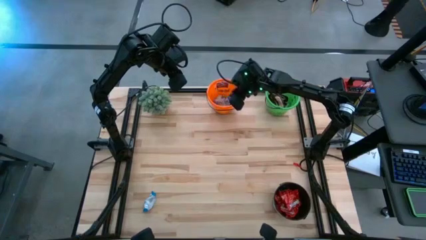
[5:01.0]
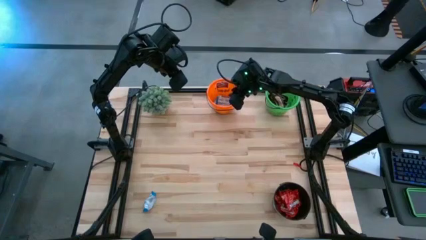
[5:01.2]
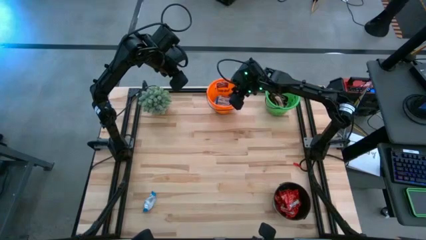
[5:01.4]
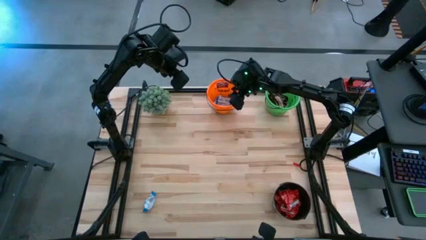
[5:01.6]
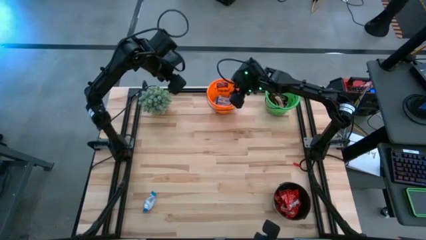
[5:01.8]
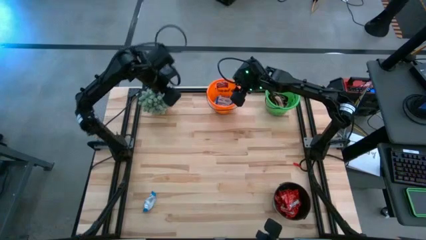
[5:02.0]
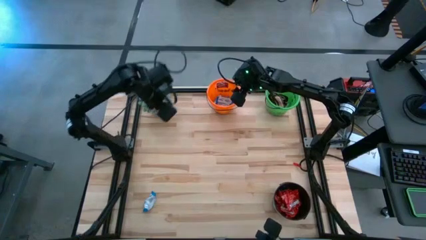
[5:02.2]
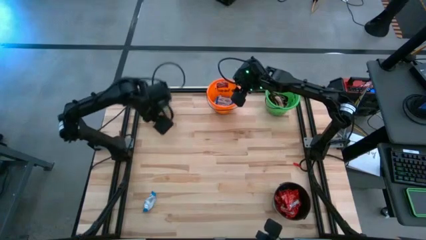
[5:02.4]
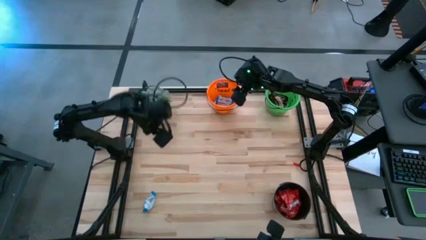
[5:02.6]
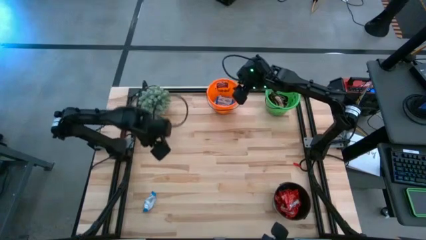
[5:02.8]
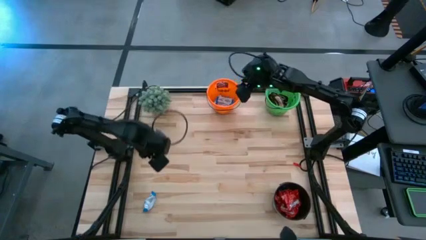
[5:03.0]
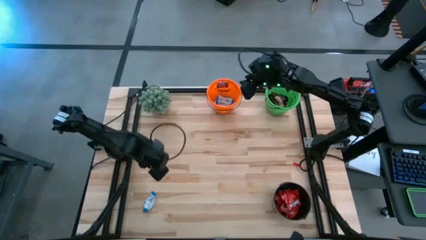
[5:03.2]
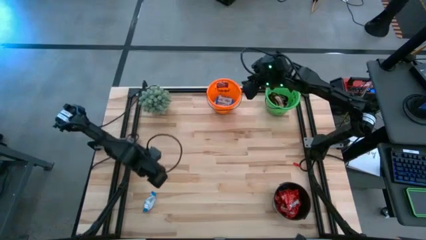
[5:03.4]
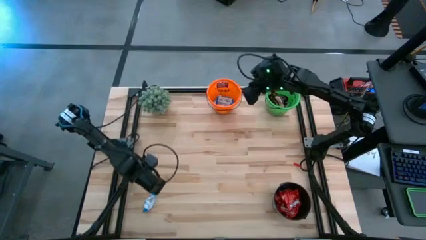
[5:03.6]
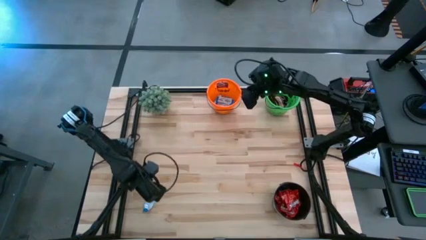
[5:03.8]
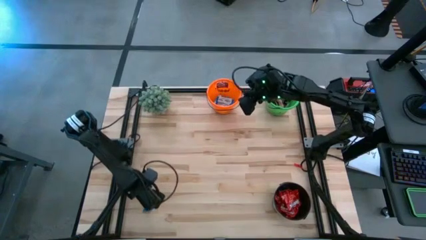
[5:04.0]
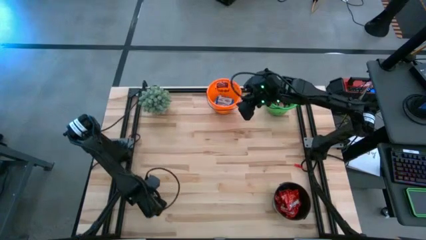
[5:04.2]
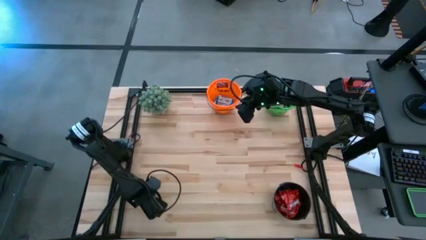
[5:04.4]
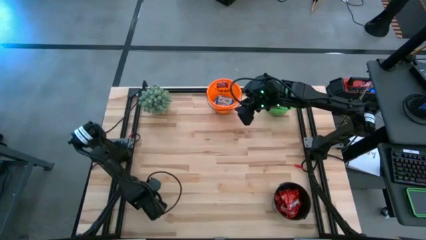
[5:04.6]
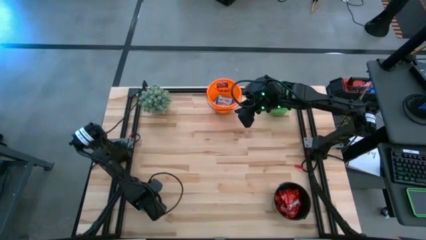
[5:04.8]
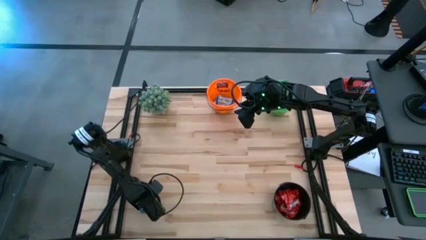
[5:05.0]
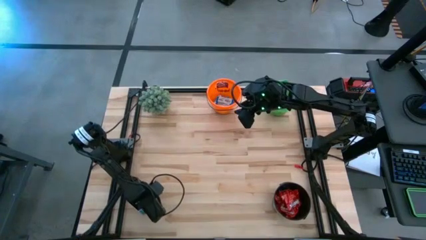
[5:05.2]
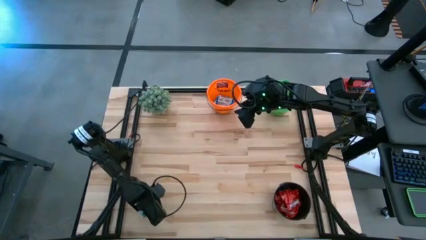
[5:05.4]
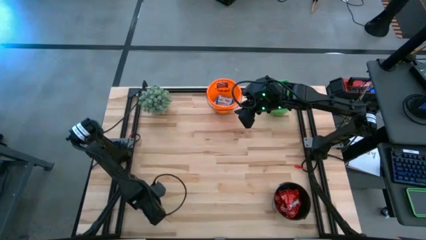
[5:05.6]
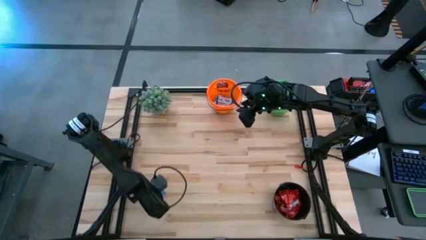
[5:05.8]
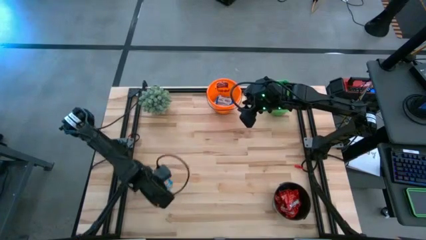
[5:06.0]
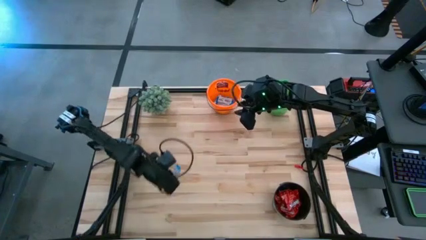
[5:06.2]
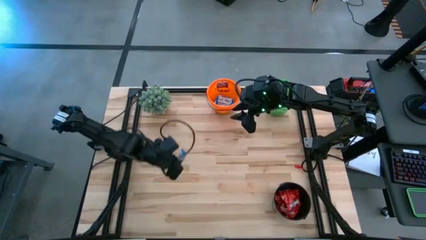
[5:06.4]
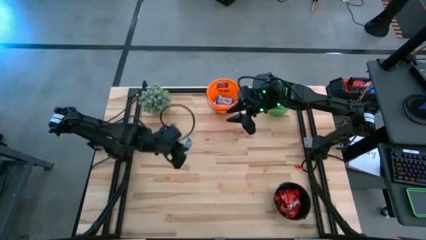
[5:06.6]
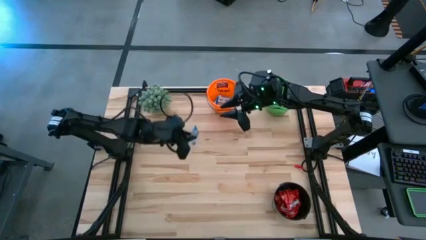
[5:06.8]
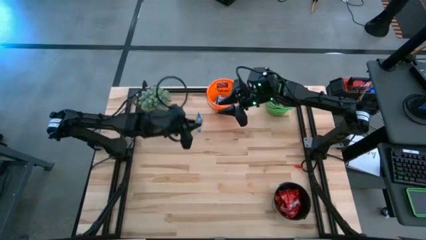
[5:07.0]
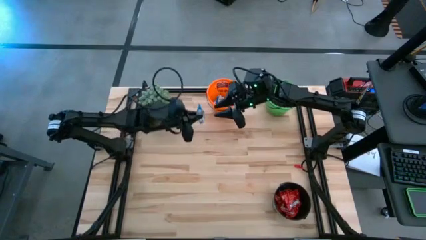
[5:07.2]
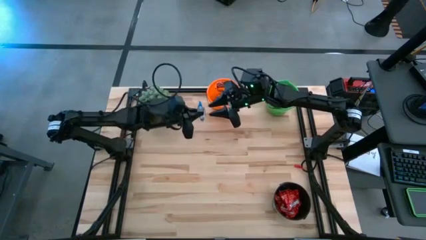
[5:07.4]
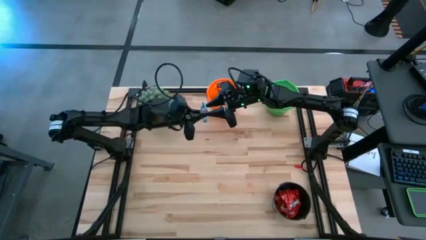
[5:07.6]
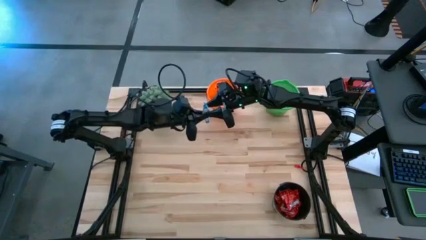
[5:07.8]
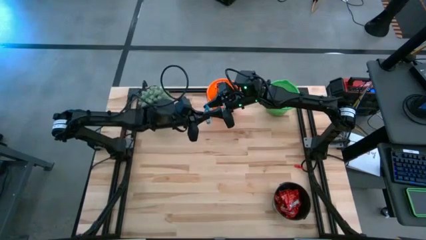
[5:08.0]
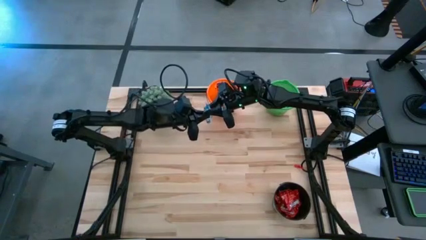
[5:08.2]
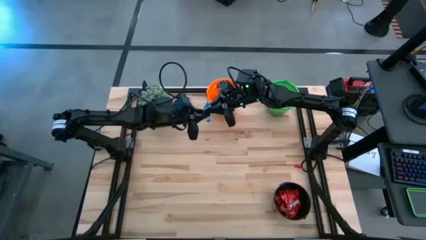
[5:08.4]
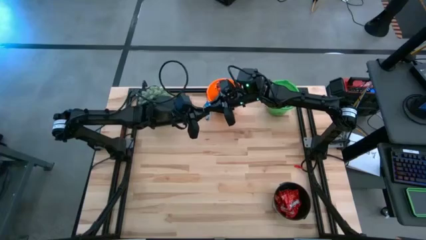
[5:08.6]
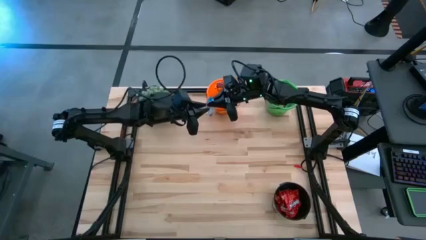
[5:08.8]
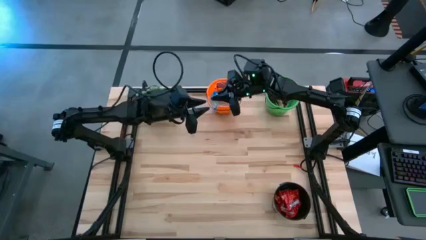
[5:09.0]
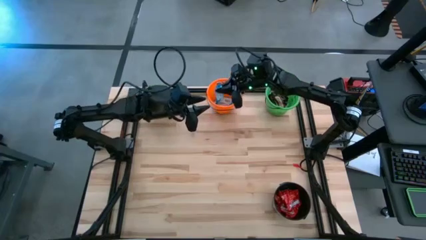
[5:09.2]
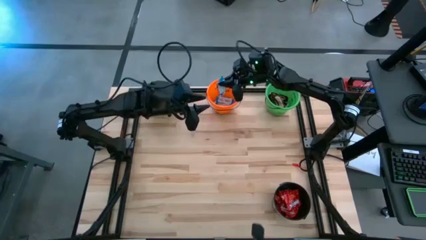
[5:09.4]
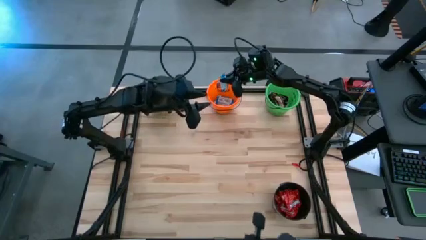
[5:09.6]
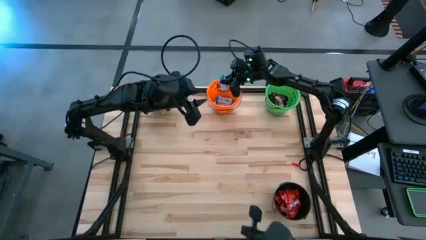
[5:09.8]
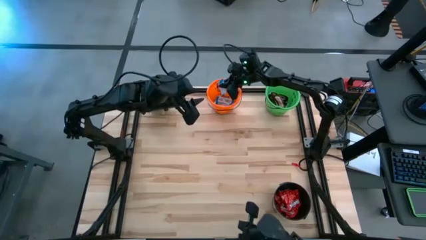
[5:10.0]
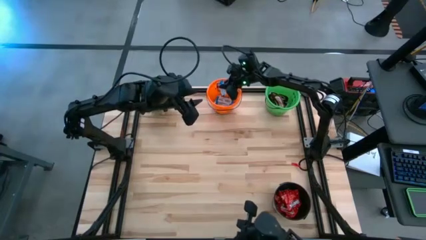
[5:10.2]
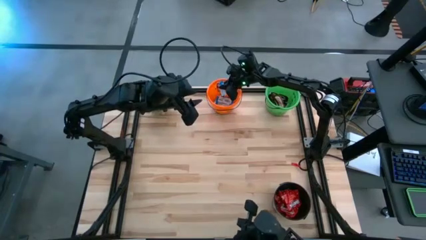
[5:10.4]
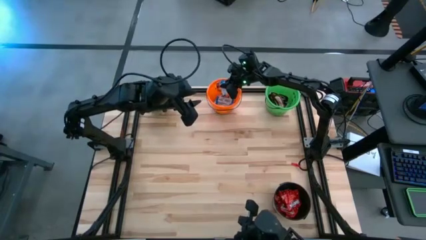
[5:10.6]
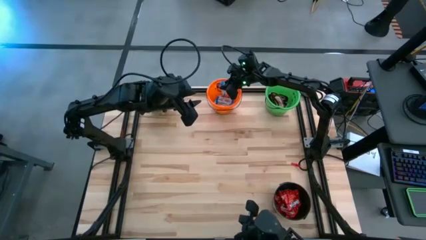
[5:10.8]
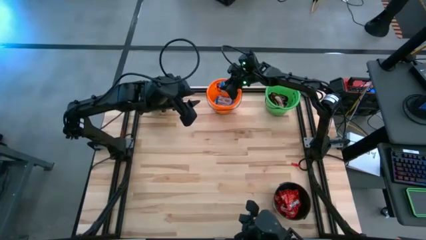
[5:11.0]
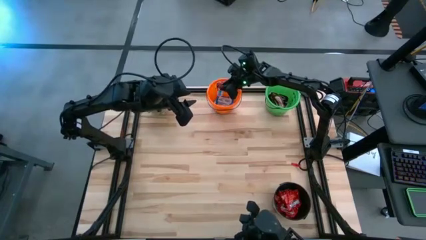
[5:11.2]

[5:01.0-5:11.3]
Task: Organize candy in baskets
Put the white chocolate into the orange bucket

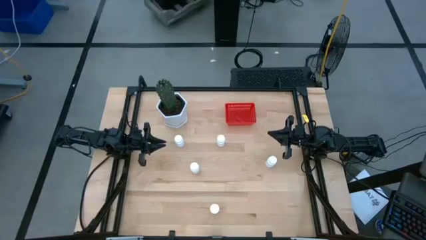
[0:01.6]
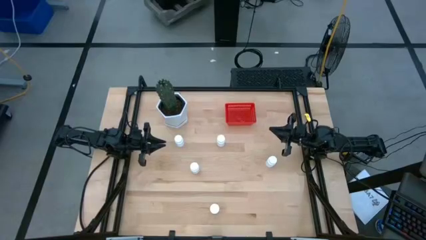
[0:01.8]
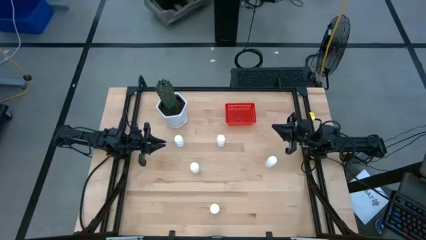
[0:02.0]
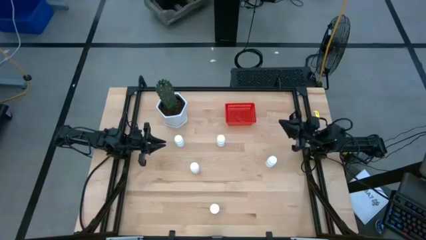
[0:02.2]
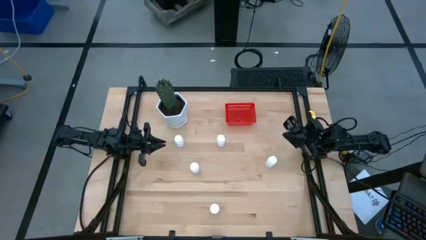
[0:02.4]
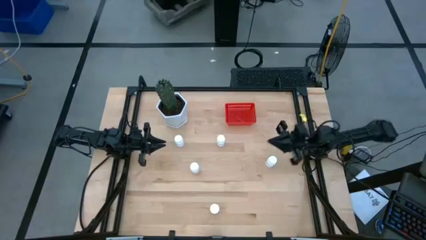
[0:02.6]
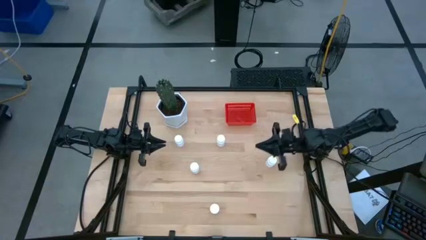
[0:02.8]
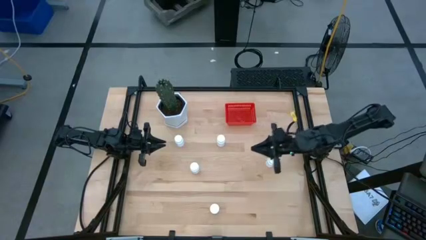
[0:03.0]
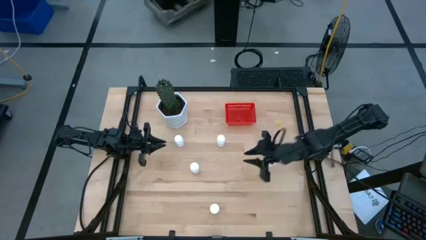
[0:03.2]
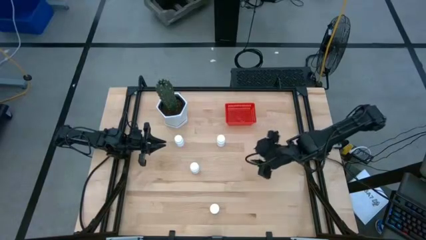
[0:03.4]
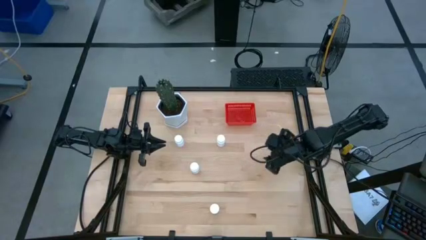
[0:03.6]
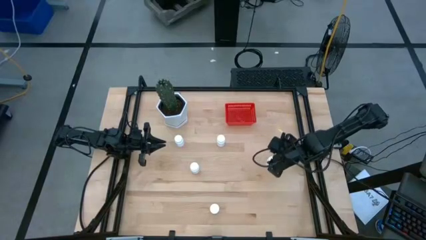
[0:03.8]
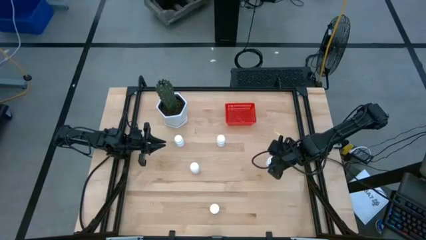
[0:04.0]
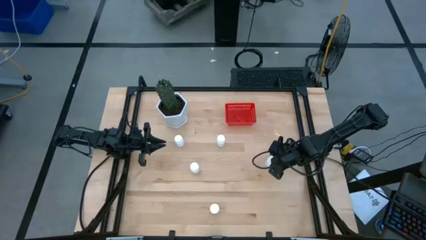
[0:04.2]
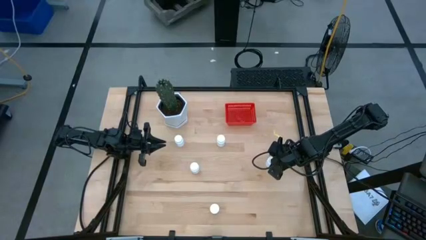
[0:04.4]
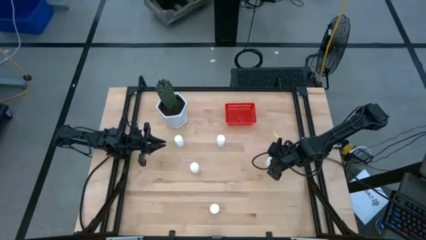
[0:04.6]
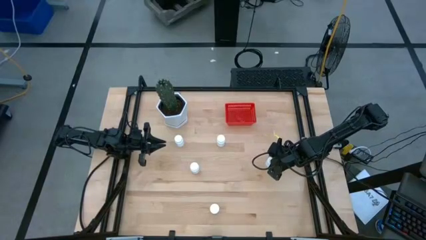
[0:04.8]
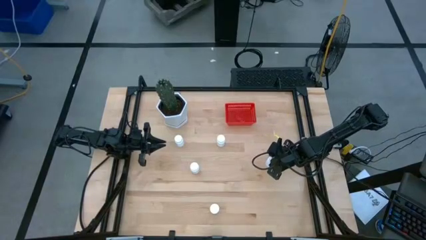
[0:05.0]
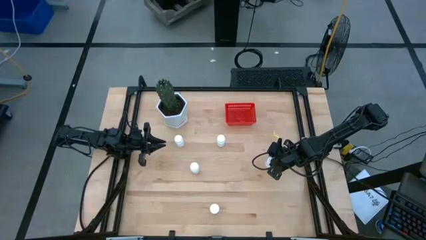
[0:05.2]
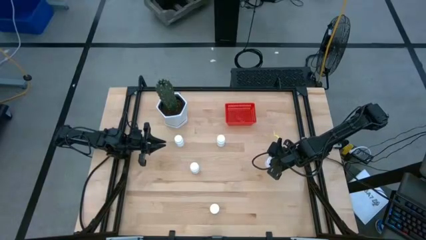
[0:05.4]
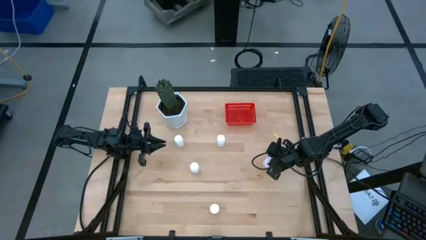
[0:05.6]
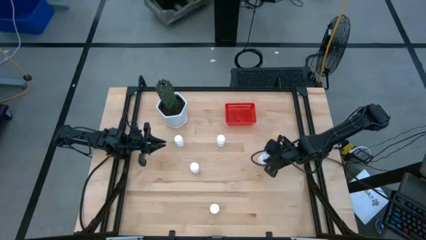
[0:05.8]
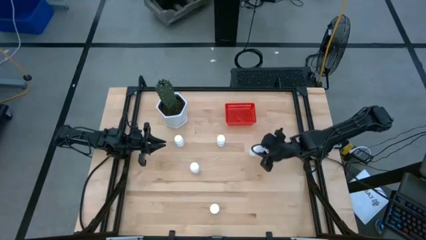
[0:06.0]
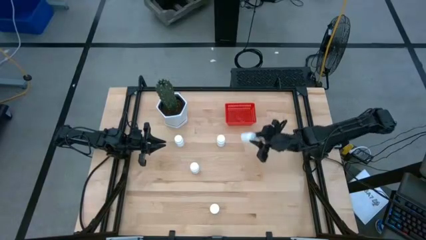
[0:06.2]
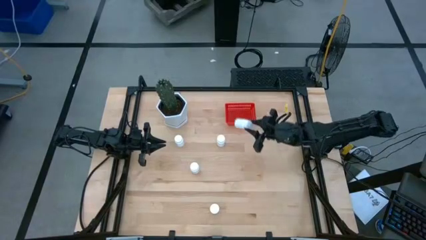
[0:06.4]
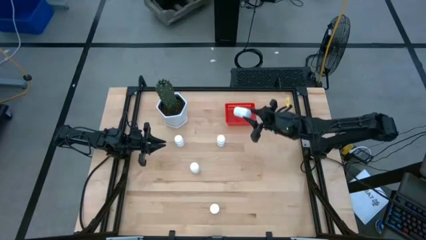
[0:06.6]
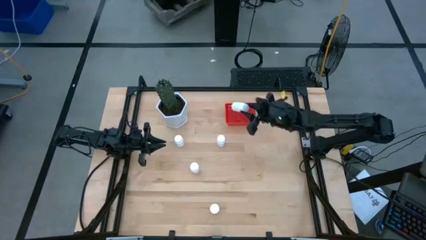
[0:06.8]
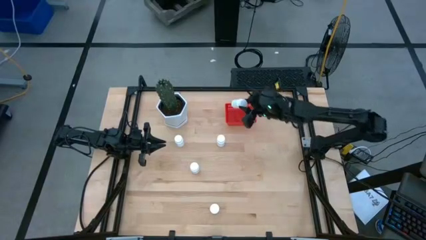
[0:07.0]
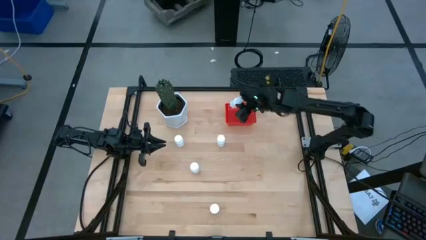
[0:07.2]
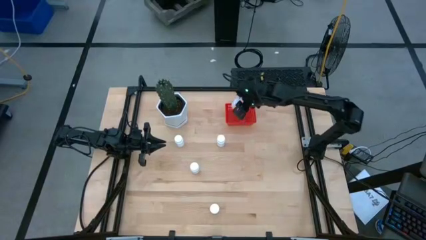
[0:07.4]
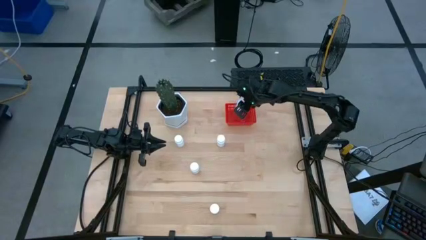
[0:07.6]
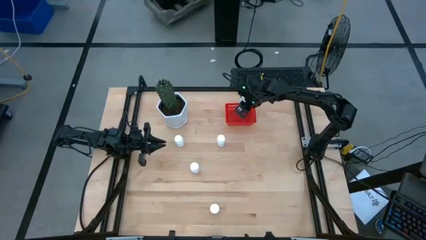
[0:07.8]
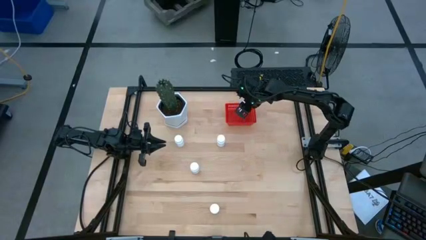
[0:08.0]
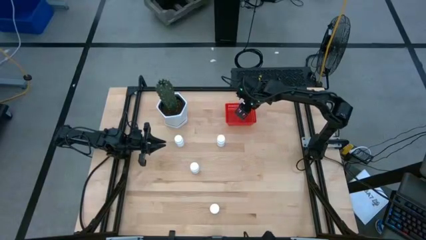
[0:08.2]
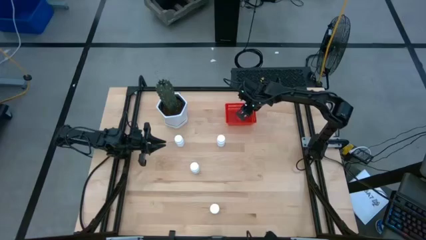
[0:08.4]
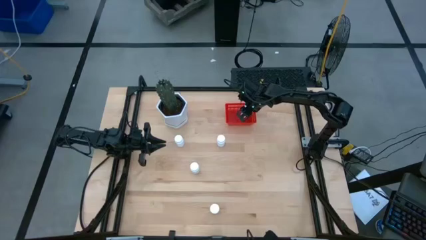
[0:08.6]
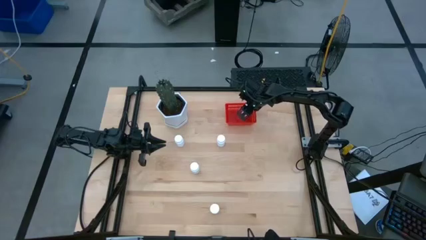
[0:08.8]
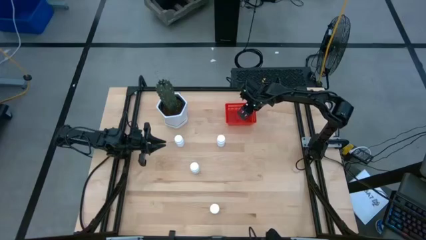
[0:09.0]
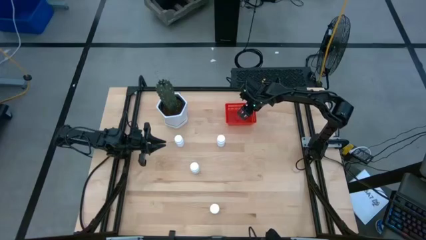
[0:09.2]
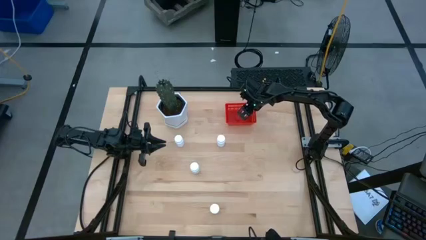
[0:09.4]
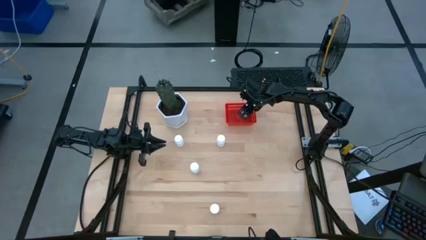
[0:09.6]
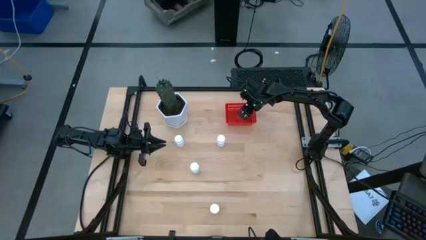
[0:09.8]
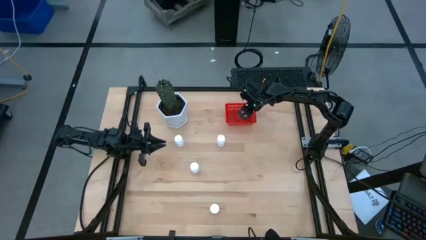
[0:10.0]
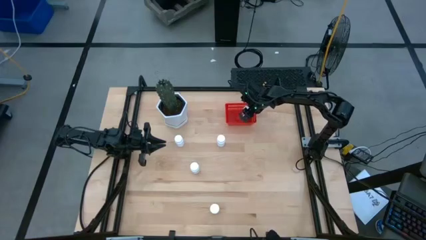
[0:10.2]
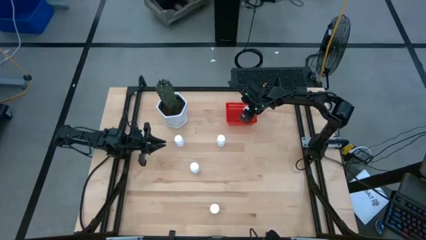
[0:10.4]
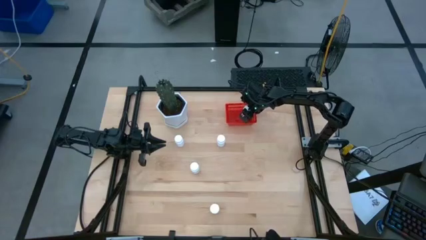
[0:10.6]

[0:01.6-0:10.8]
Task: Pick and place pill bottles into a basket
Put the white pill bottle into the red bin
